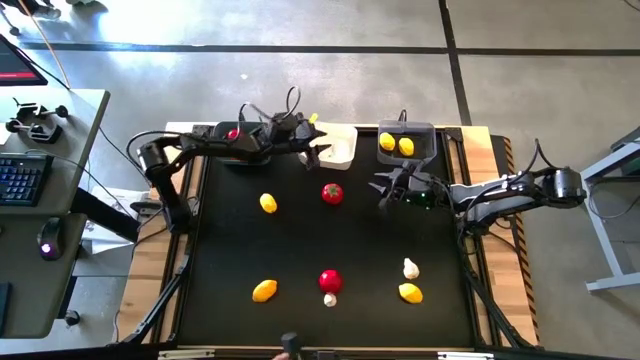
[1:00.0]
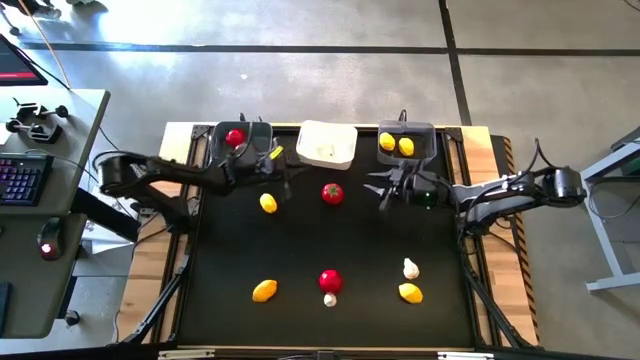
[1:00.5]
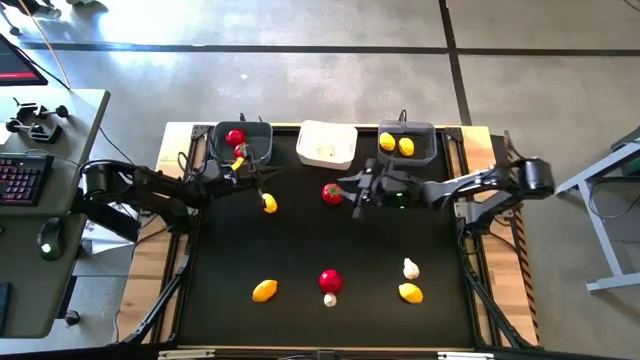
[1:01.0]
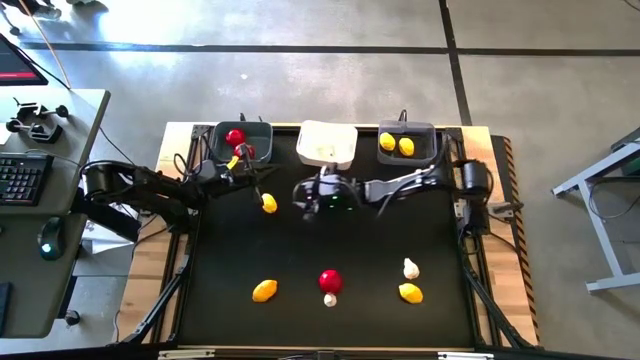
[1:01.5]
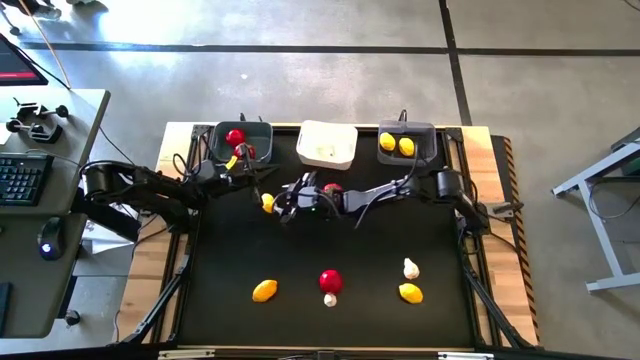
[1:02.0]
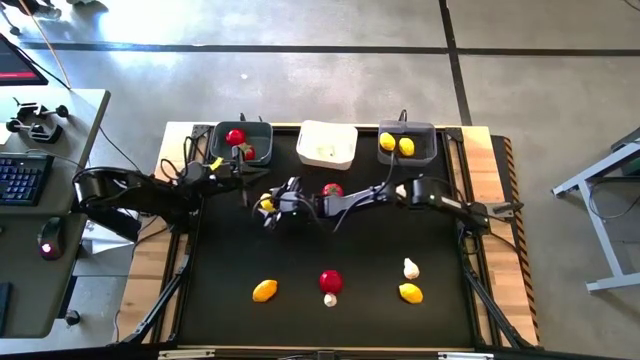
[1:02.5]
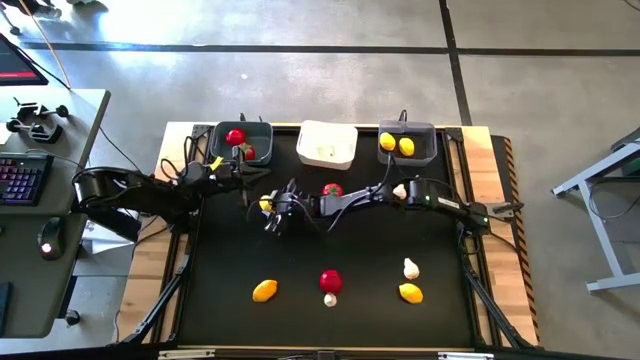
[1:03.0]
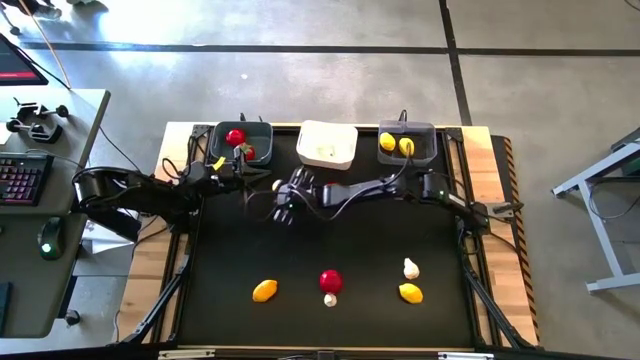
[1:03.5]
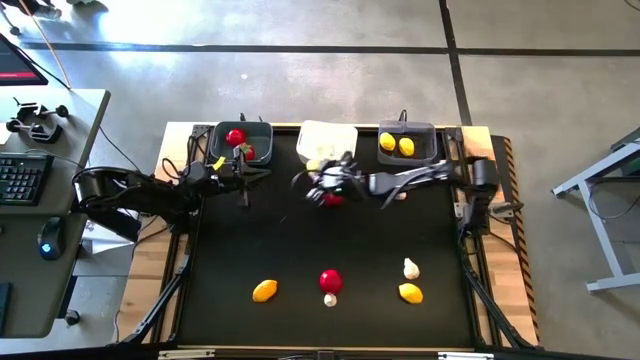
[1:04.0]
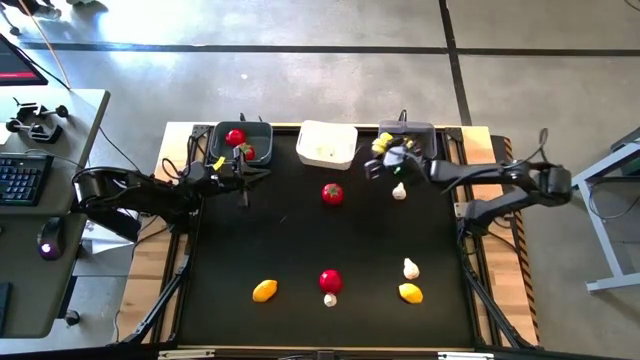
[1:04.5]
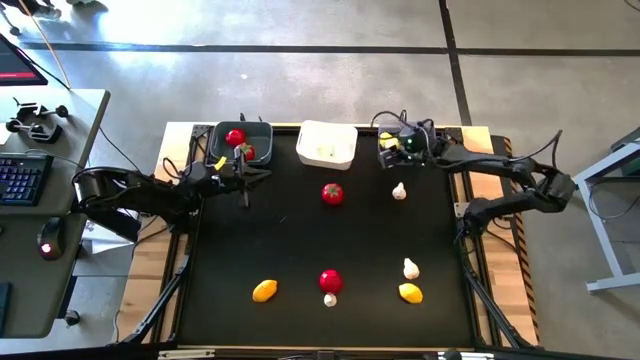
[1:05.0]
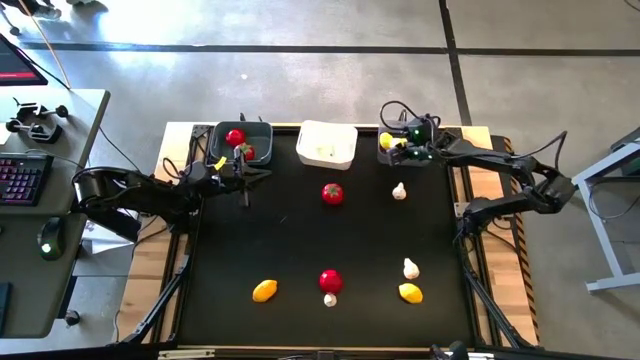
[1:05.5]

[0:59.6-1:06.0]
Task: Sort produce into baskets
Put the top left yellow lemon into the transparent bin

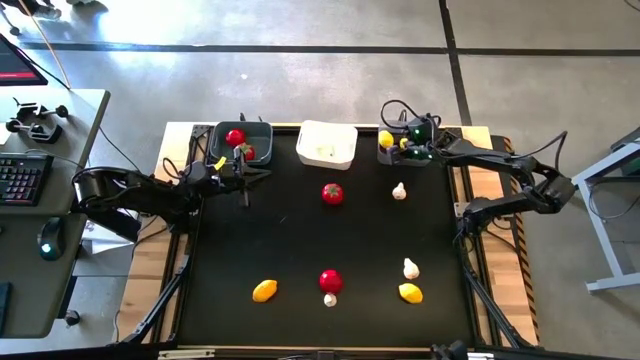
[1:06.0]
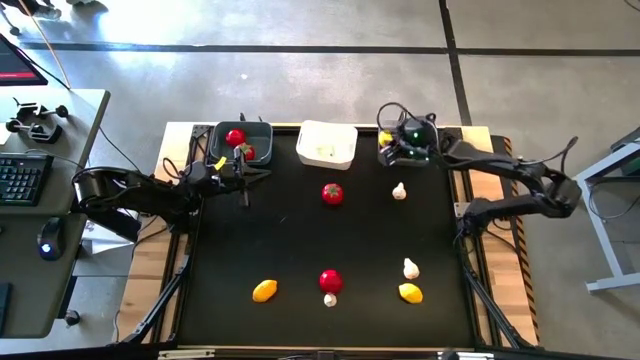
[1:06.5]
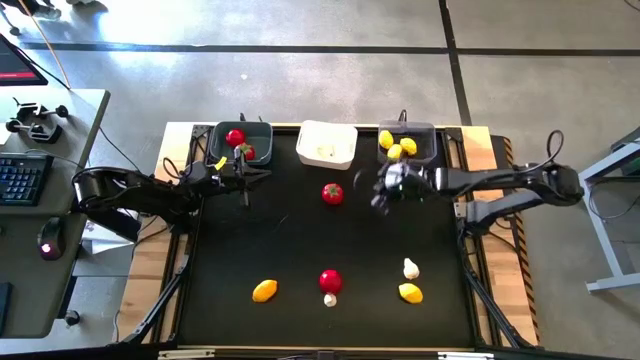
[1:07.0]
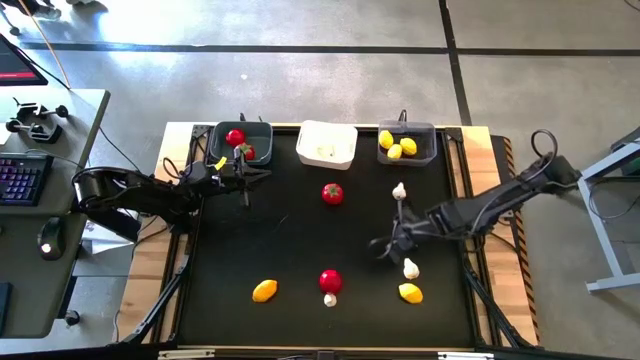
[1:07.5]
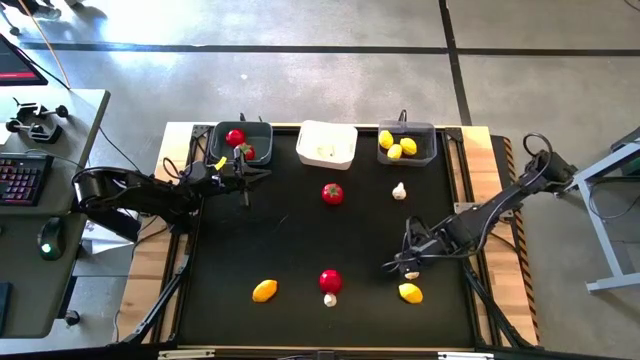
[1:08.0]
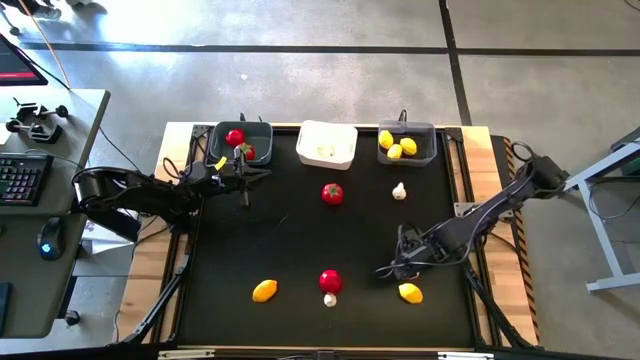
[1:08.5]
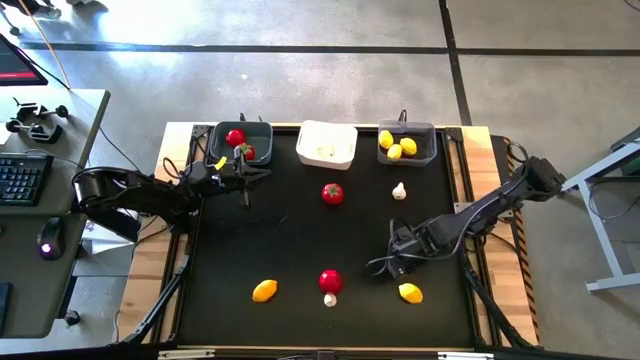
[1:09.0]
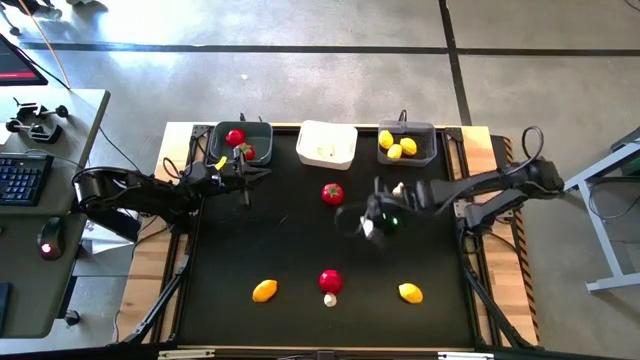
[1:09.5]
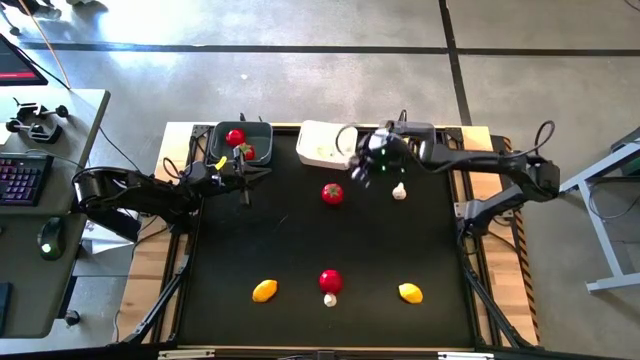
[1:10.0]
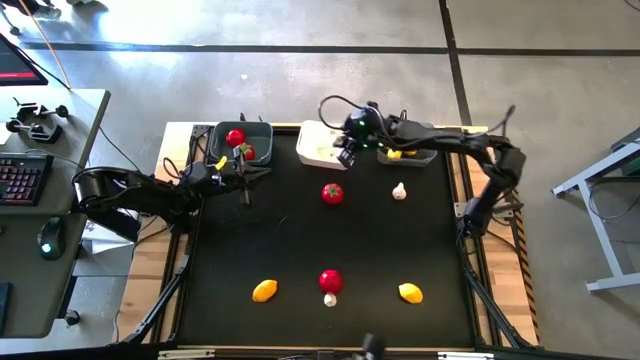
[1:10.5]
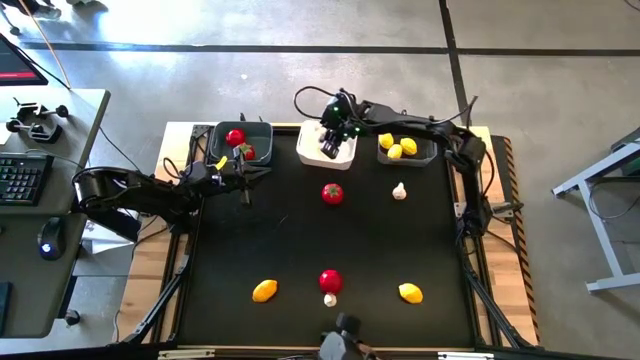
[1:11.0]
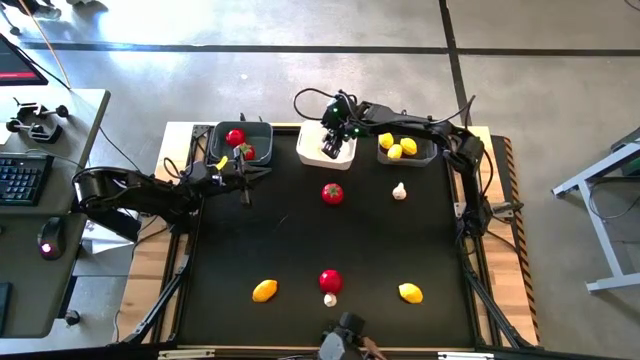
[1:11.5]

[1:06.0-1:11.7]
Put the bottom right white garlic into the white bin

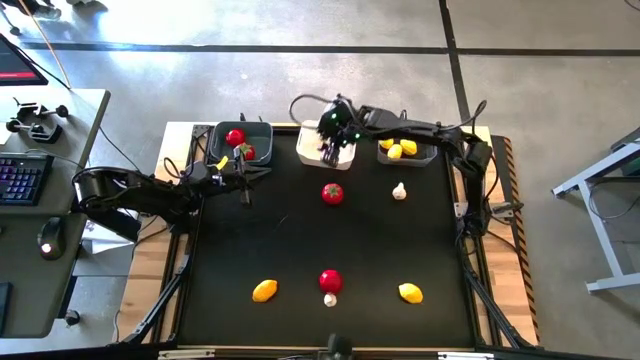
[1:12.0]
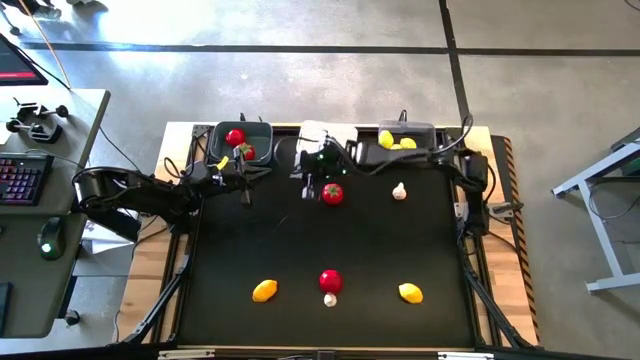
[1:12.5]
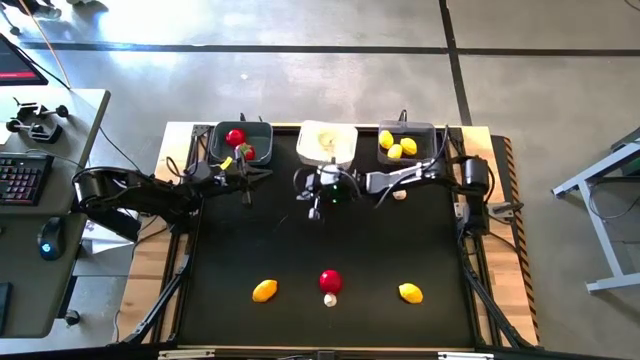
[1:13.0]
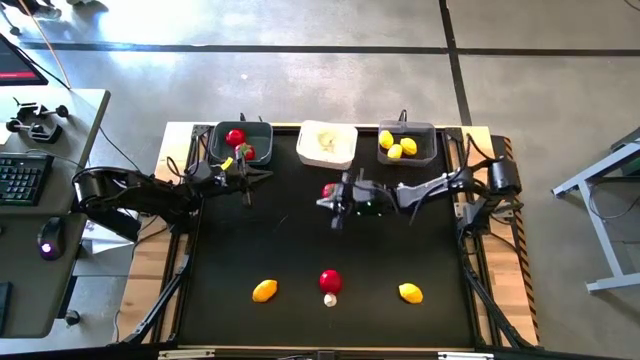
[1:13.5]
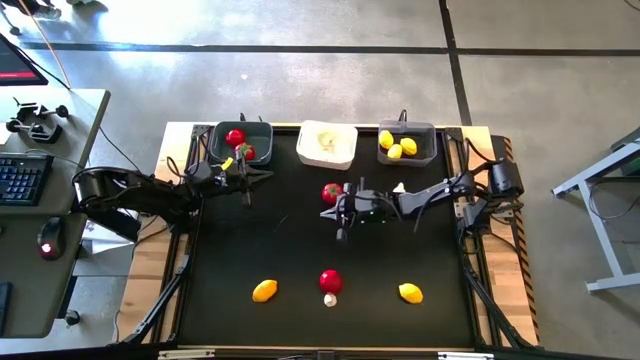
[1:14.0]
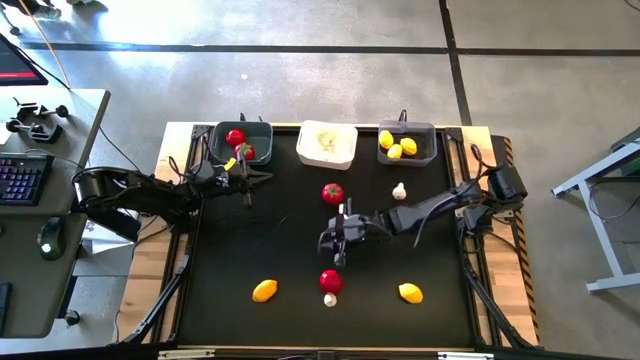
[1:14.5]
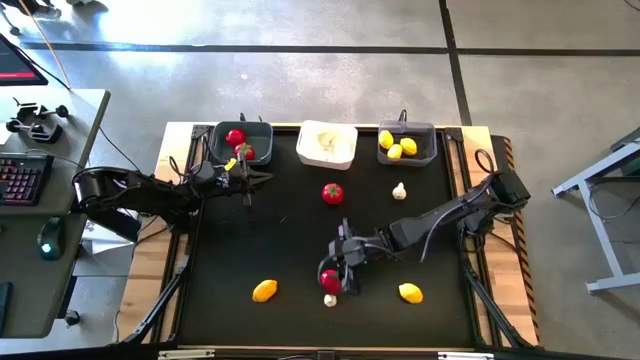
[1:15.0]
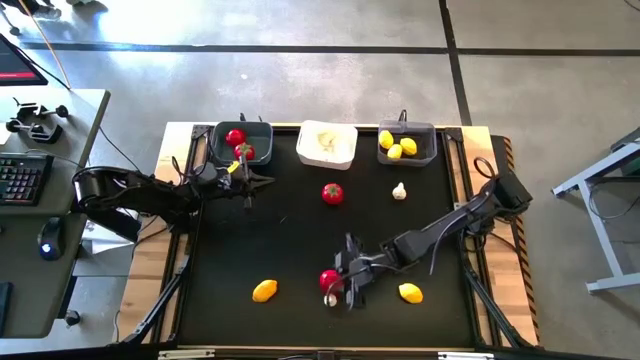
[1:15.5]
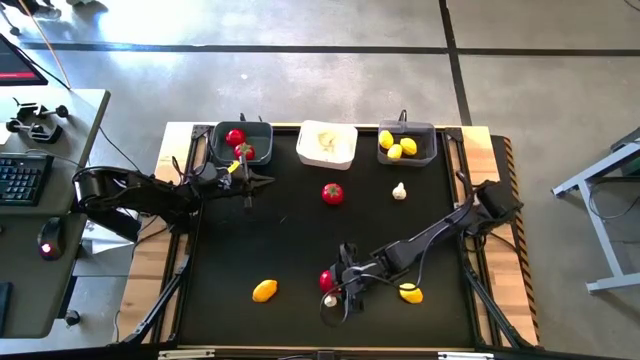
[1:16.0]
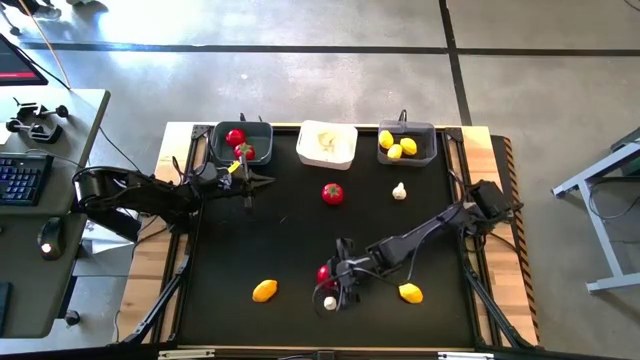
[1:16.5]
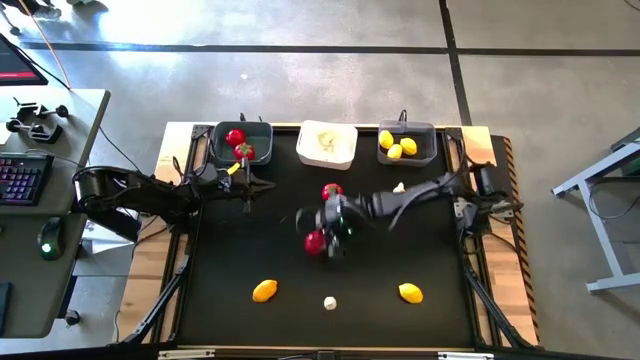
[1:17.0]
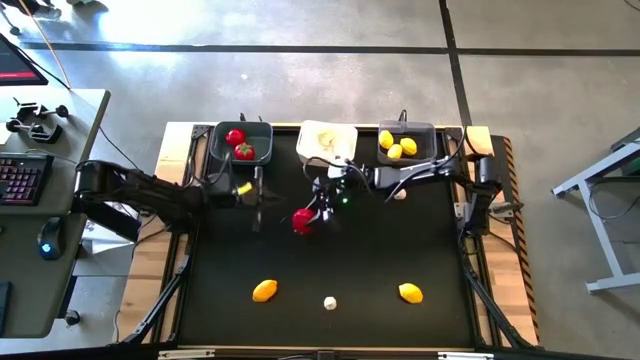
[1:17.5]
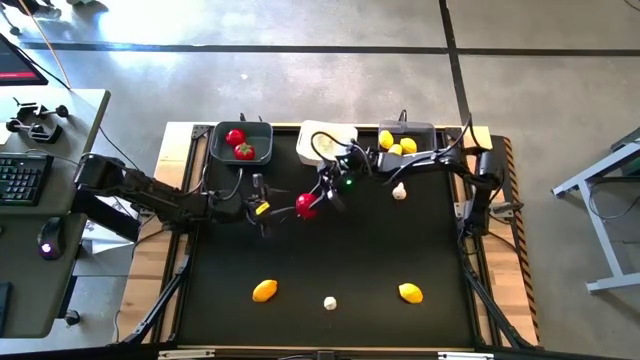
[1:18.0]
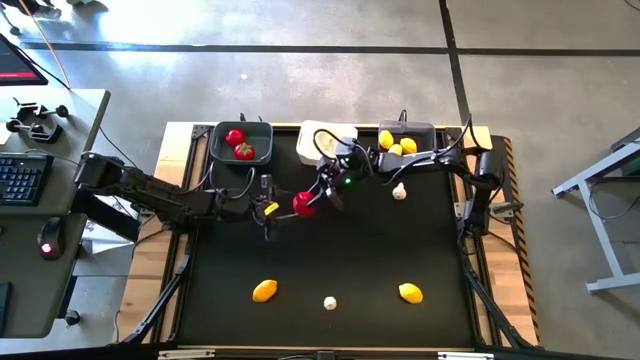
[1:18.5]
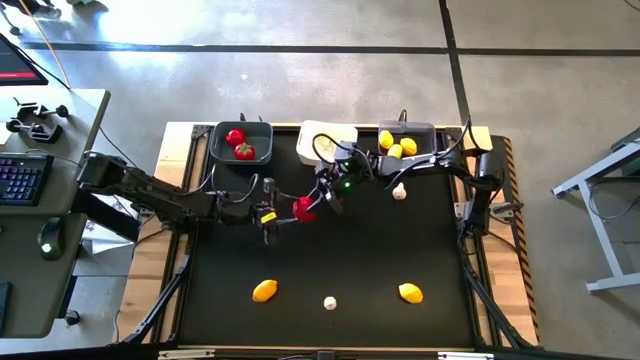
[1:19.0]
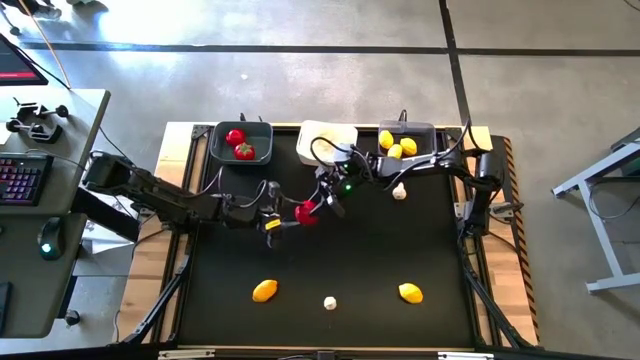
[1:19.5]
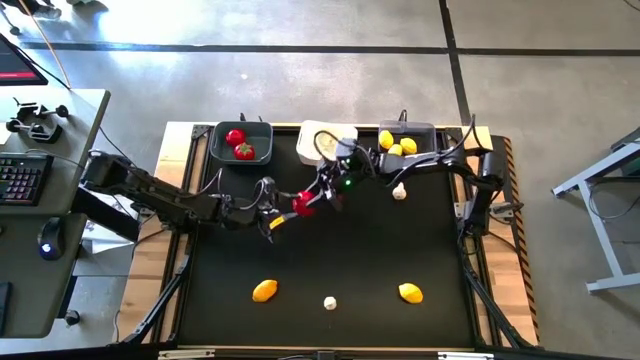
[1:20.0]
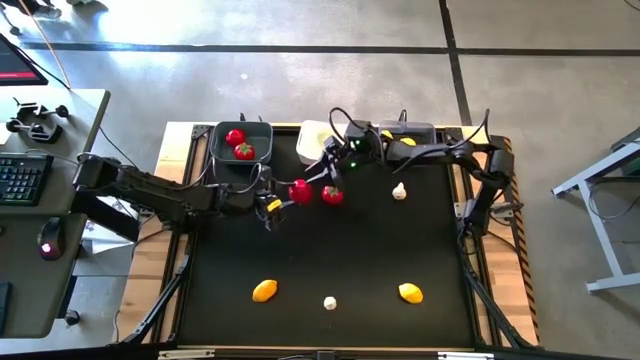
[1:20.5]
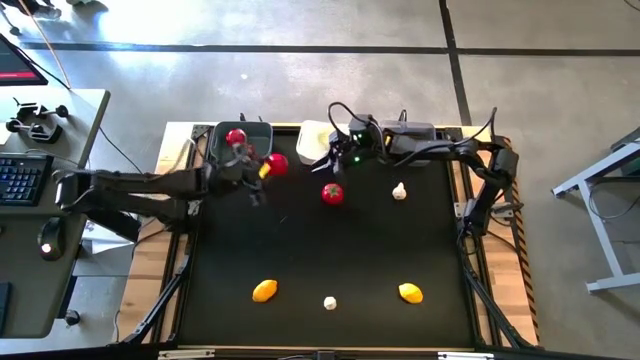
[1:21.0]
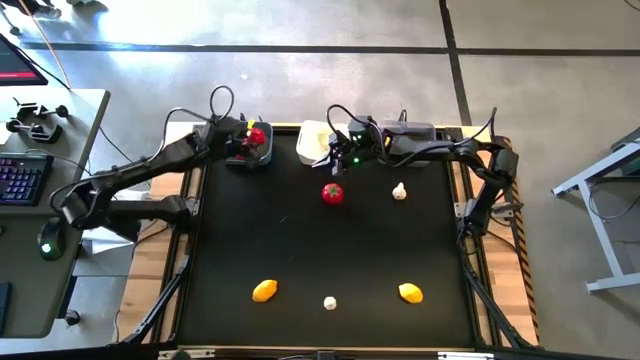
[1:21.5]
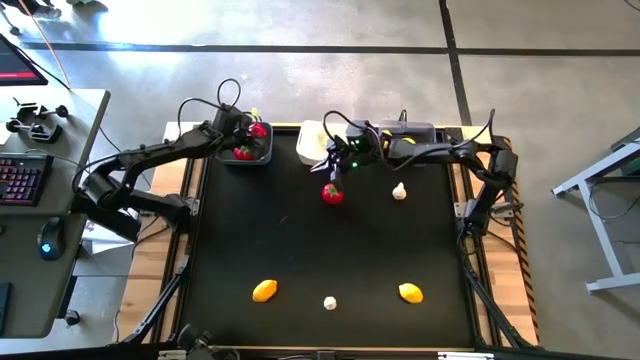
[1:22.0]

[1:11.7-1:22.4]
Put the bottom red tomato into the gray bin
